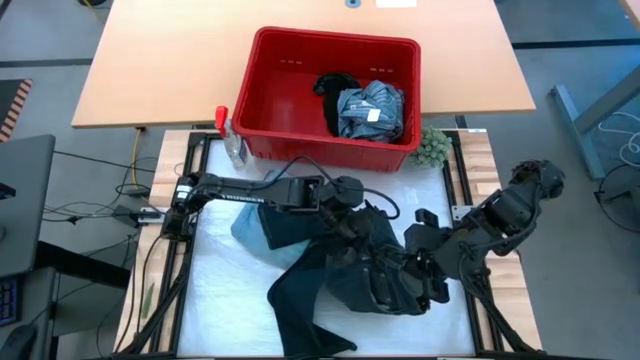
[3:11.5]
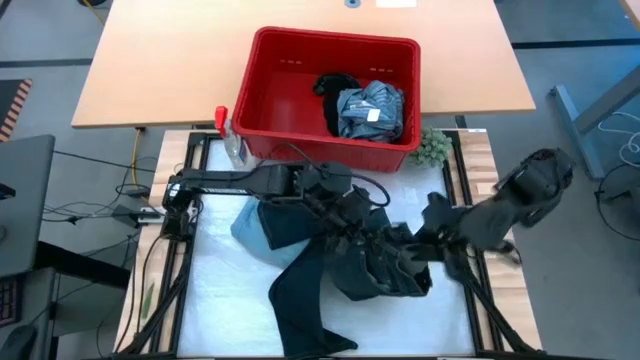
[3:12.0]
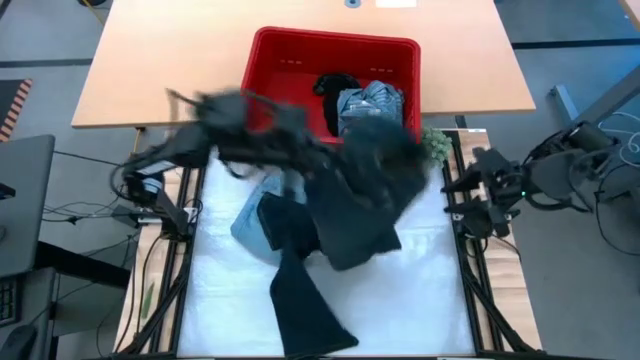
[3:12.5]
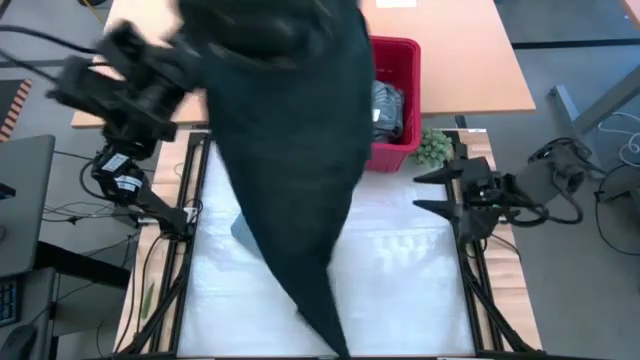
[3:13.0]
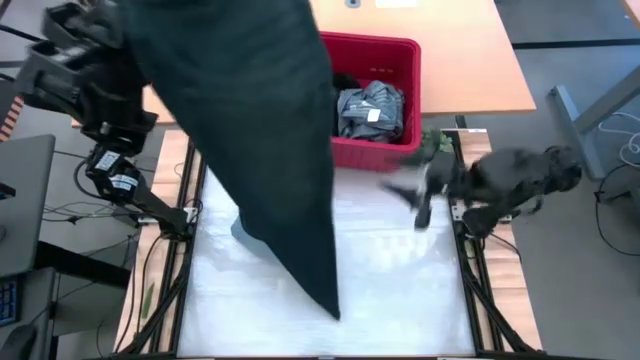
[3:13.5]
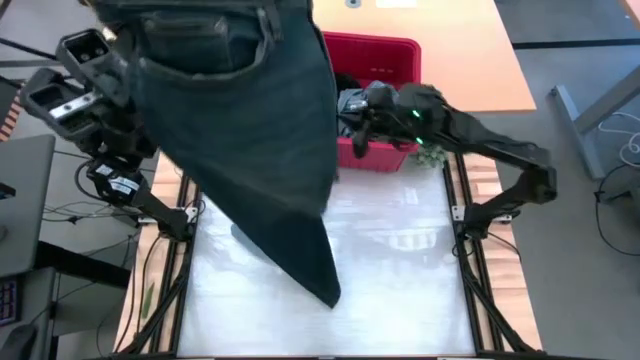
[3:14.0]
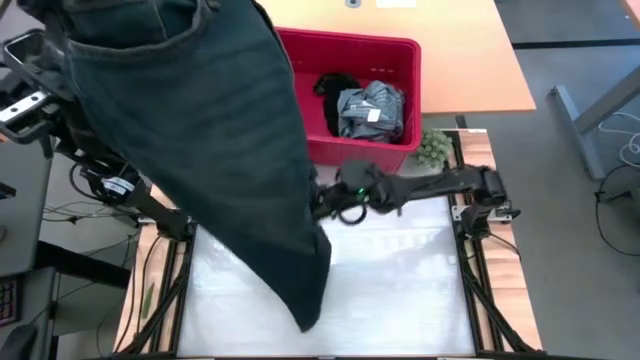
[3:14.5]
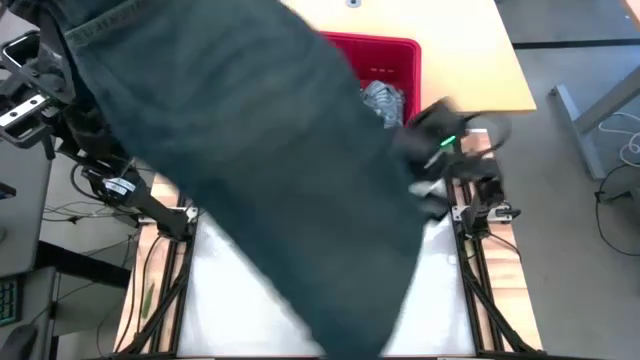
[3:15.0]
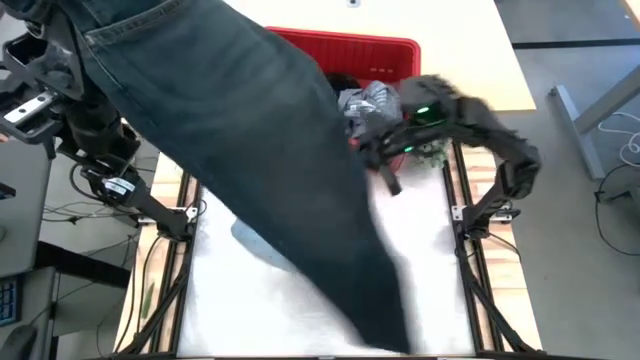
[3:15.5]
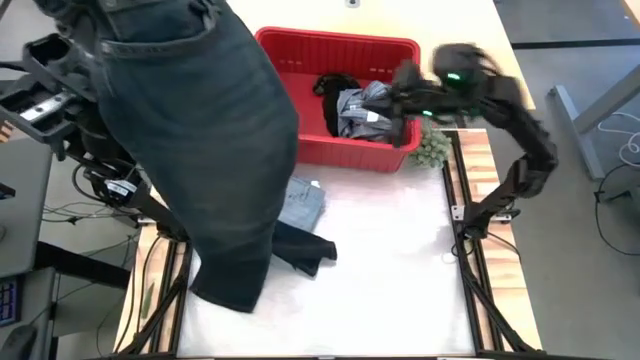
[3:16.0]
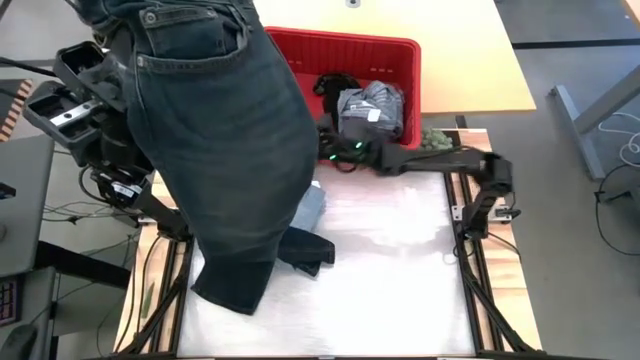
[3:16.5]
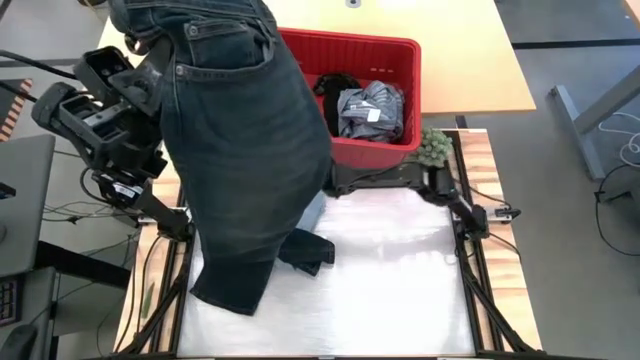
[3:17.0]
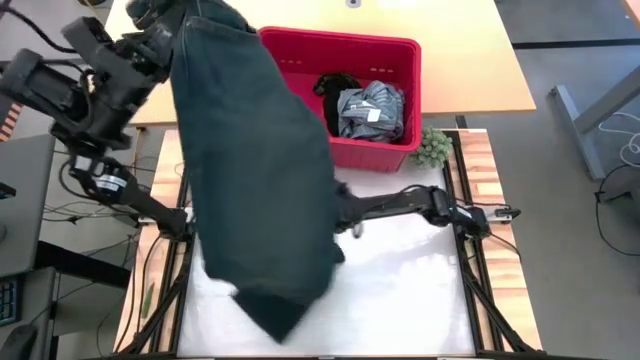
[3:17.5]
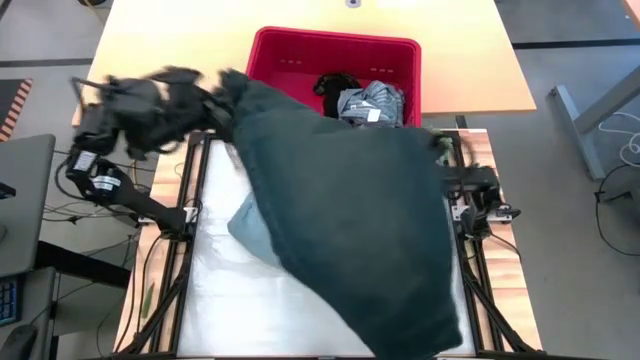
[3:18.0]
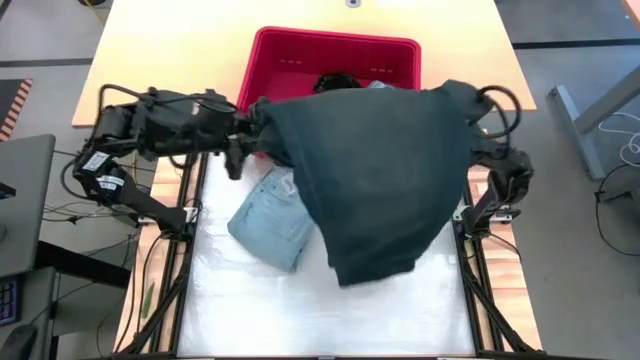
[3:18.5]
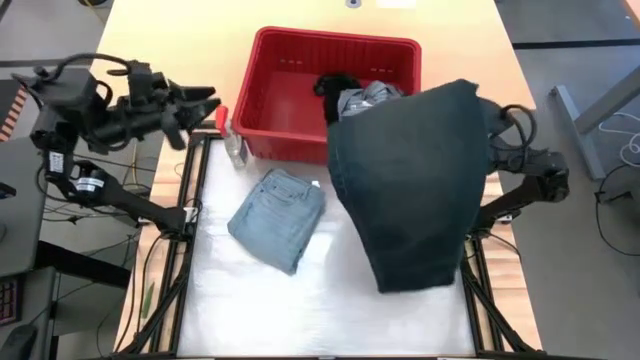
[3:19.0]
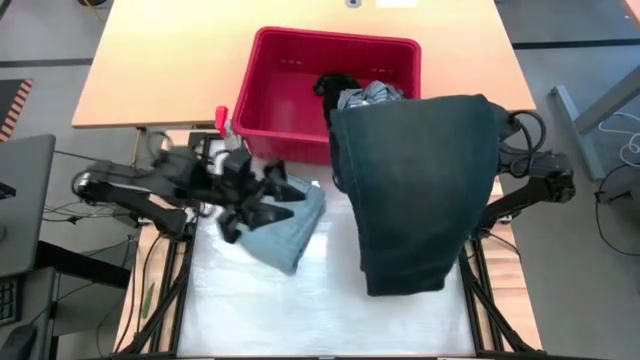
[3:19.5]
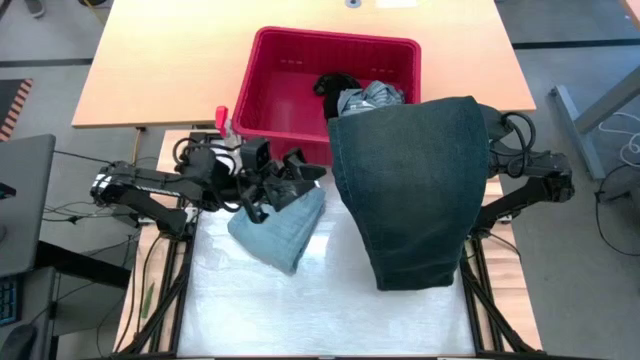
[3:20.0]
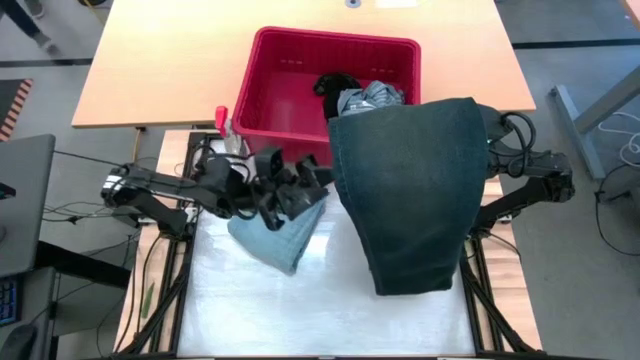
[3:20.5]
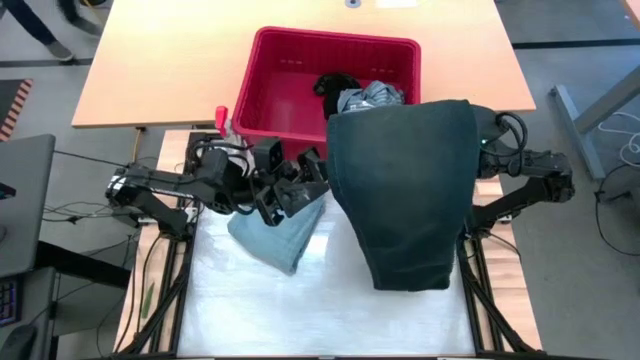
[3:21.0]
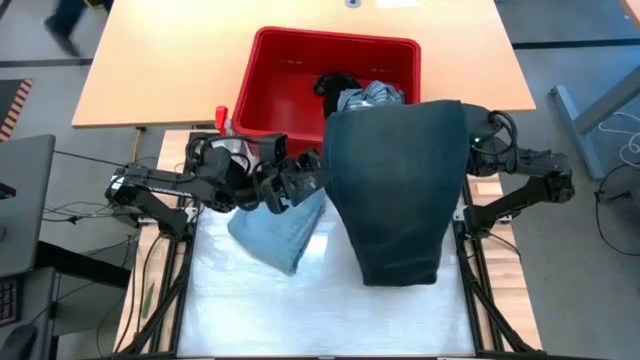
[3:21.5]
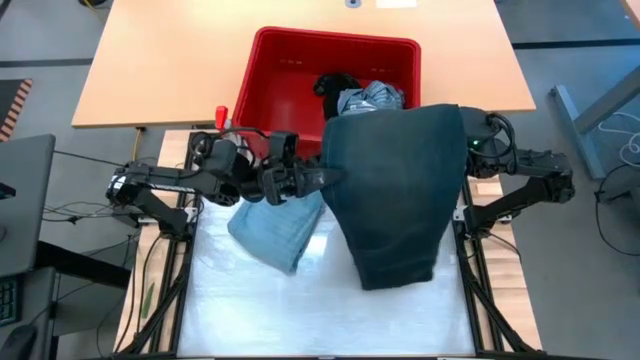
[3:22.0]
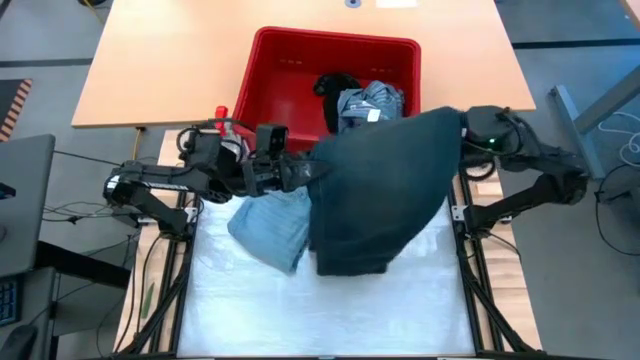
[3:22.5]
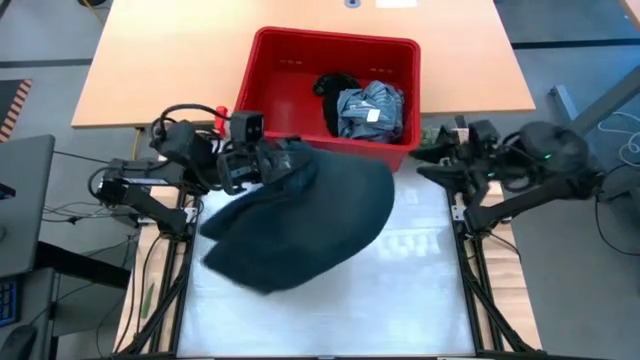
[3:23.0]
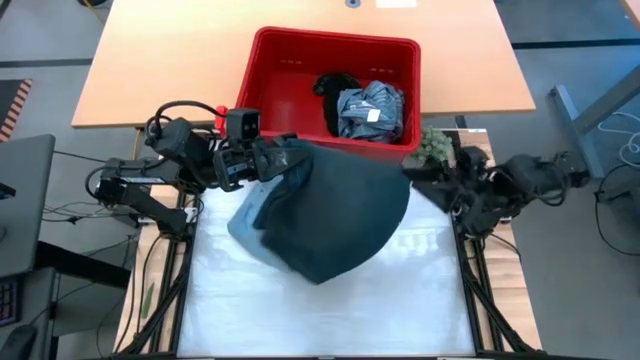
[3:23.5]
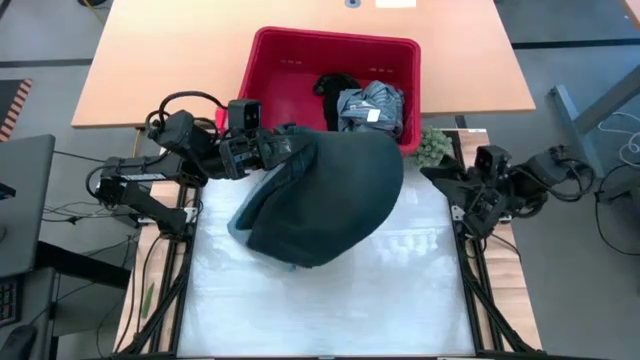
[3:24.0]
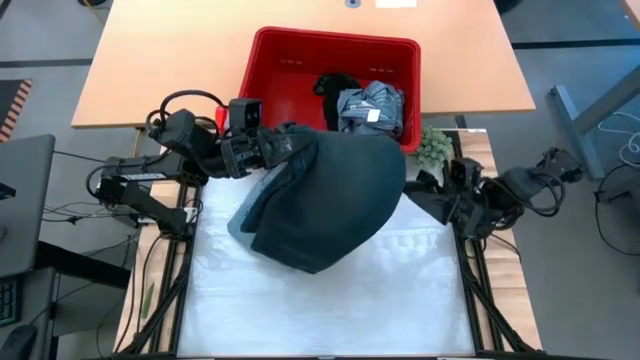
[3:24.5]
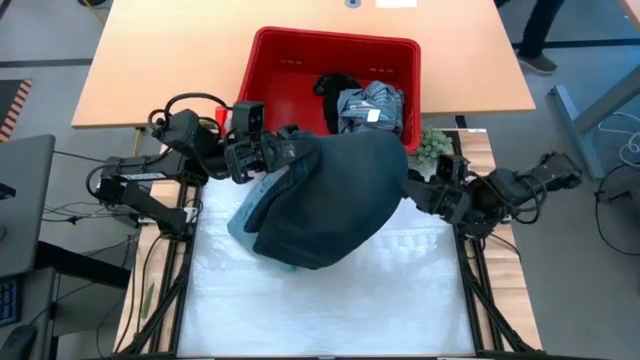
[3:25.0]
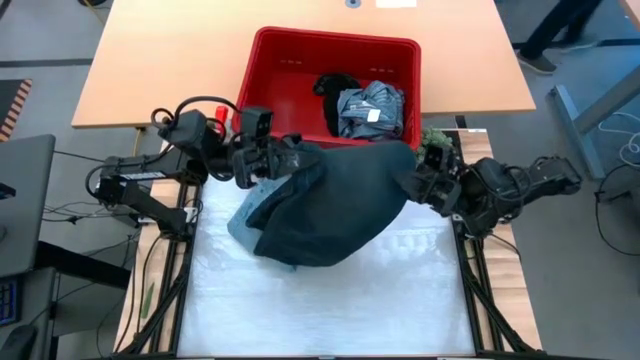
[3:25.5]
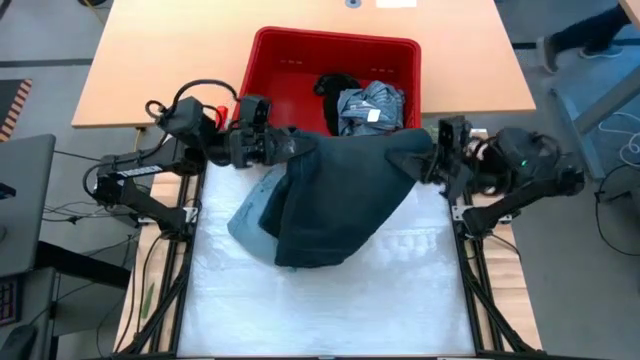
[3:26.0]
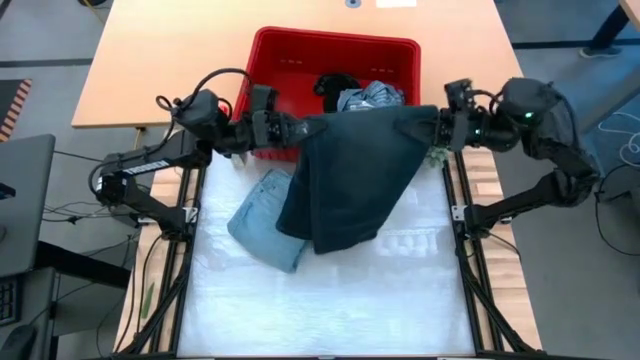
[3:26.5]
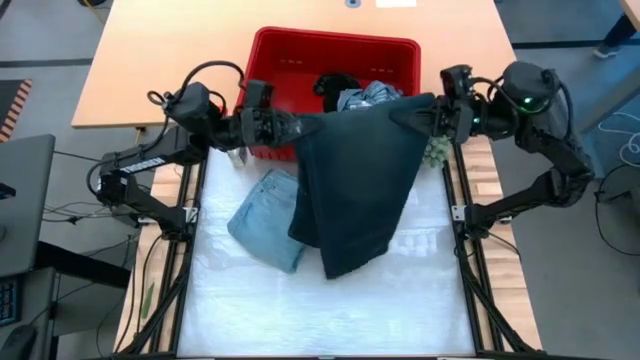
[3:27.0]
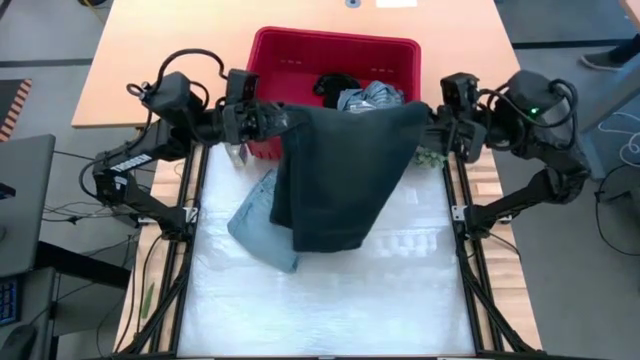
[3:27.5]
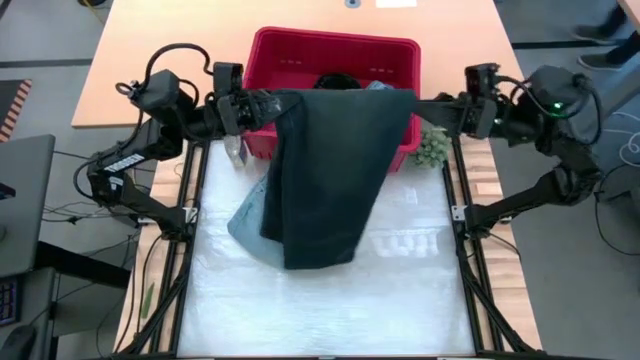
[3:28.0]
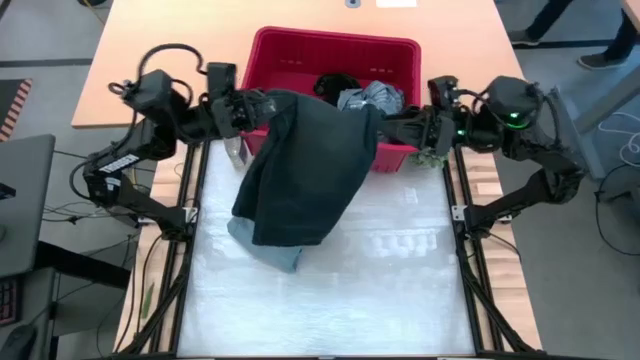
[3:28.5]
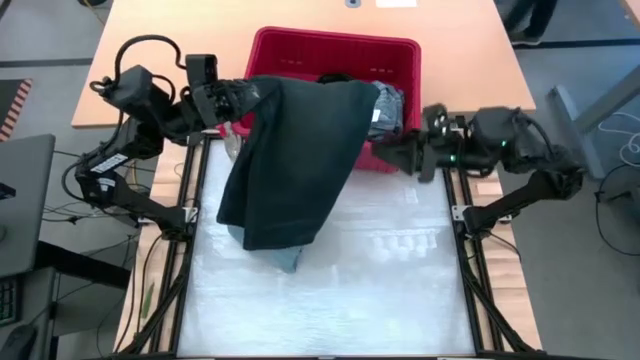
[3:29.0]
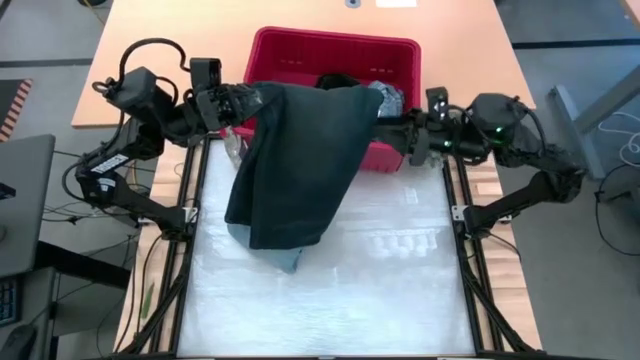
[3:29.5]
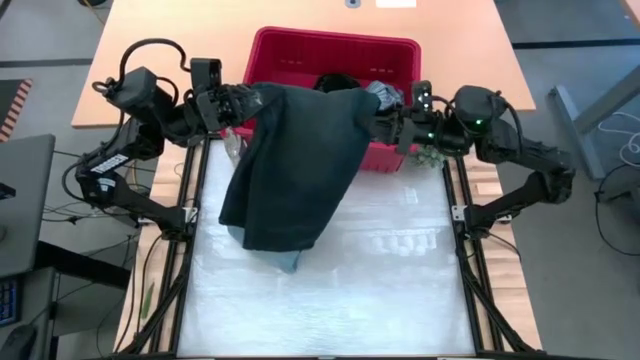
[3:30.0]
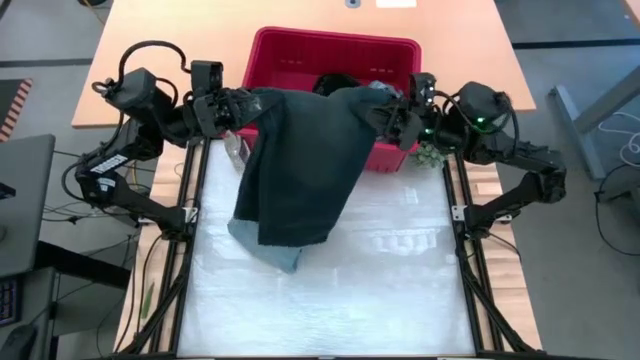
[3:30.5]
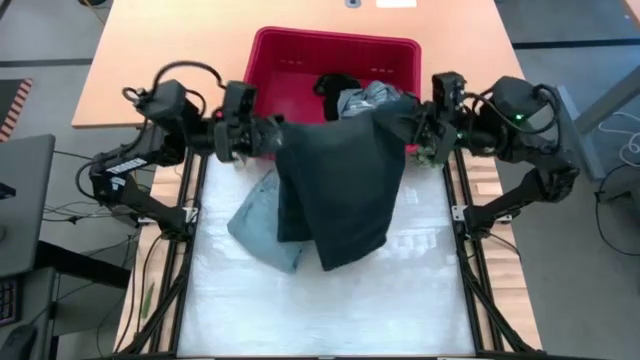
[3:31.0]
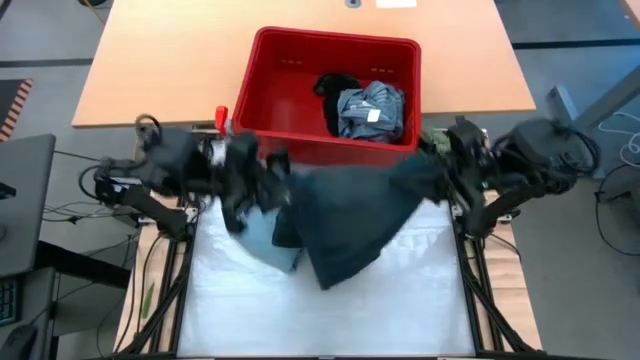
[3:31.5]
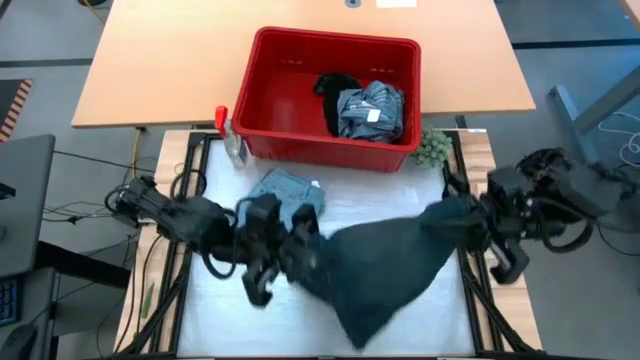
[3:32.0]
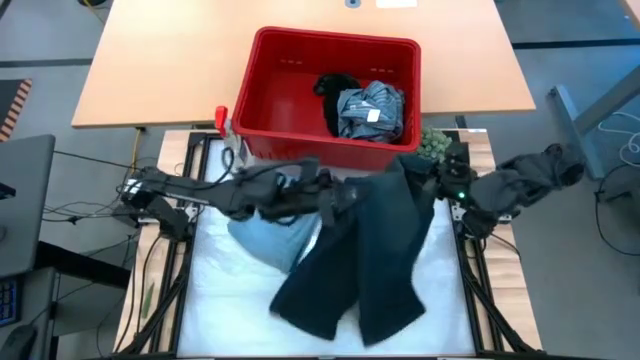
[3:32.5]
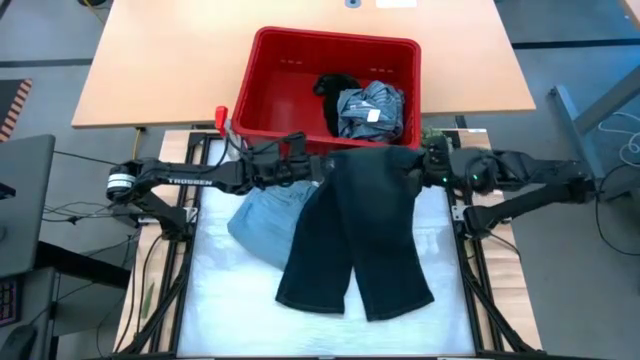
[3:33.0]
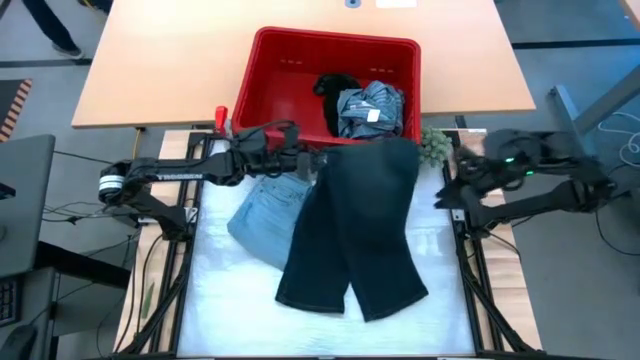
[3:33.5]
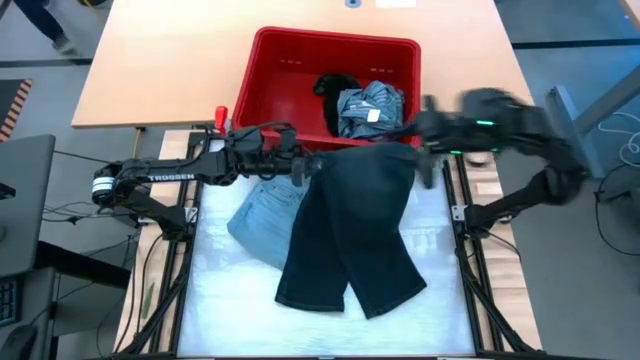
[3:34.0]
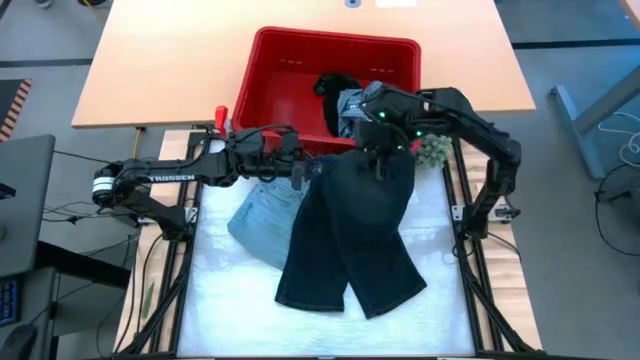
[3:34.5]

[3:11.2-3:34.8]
Task: Fold laundry
Fold the black pants from the red laundry bin
